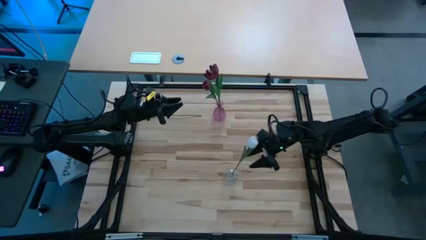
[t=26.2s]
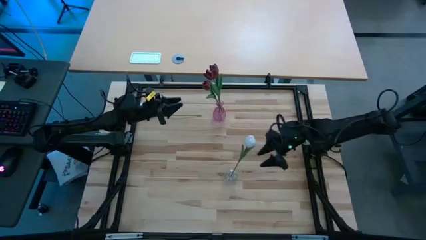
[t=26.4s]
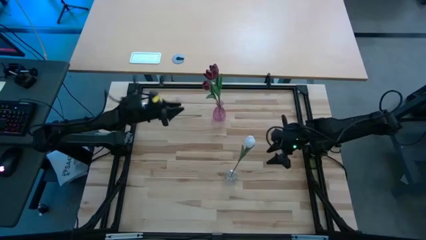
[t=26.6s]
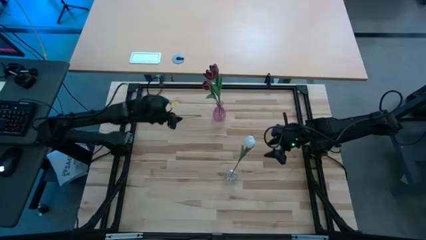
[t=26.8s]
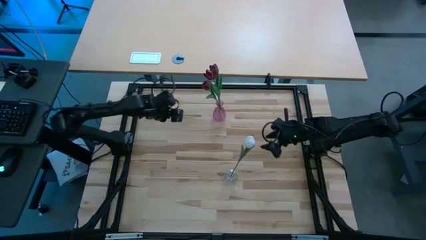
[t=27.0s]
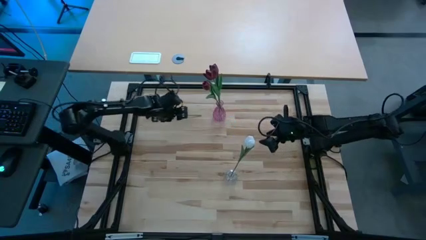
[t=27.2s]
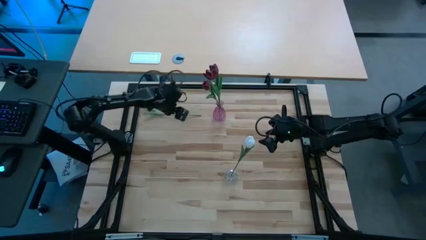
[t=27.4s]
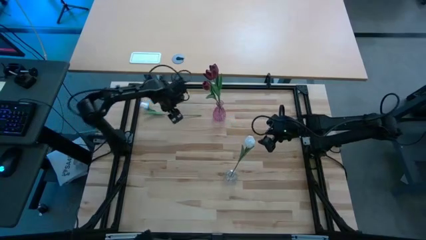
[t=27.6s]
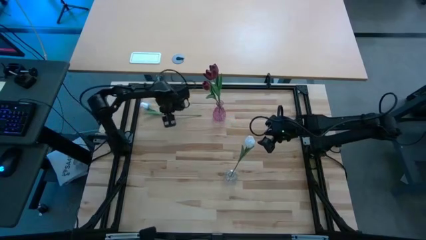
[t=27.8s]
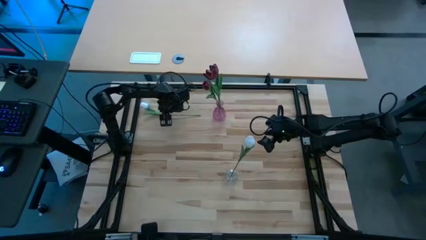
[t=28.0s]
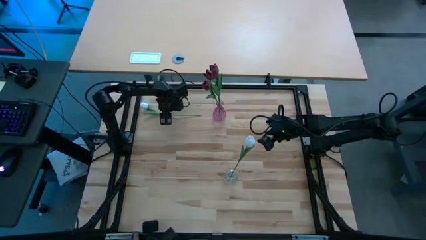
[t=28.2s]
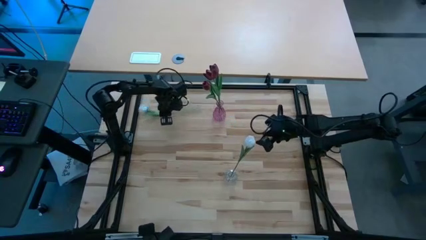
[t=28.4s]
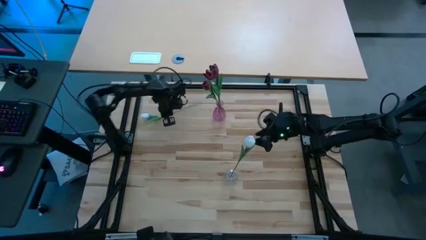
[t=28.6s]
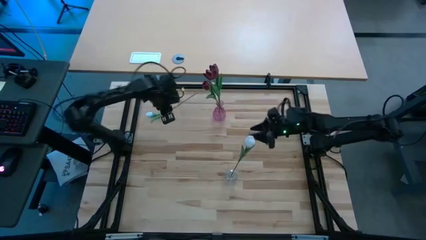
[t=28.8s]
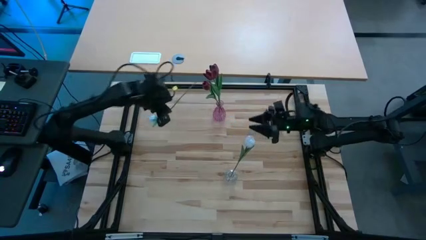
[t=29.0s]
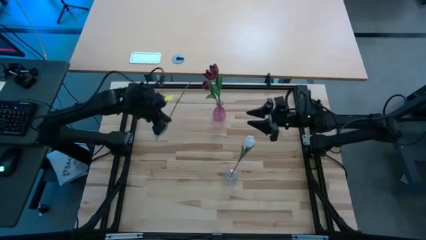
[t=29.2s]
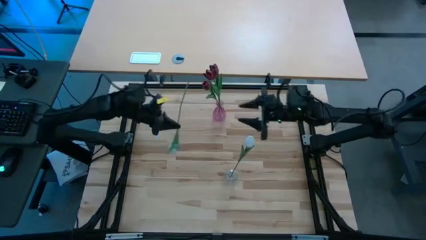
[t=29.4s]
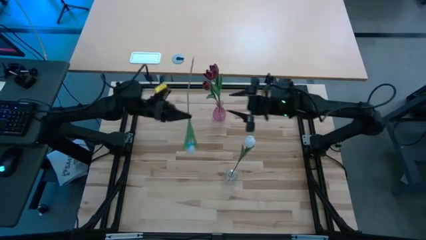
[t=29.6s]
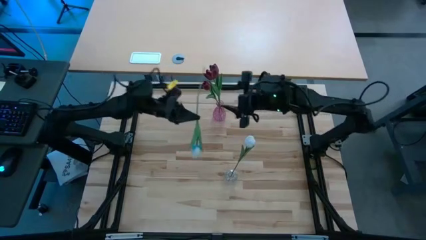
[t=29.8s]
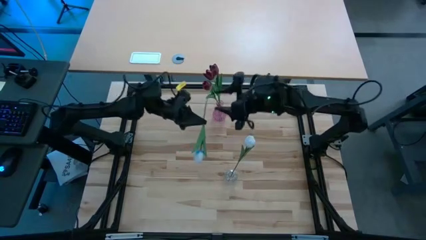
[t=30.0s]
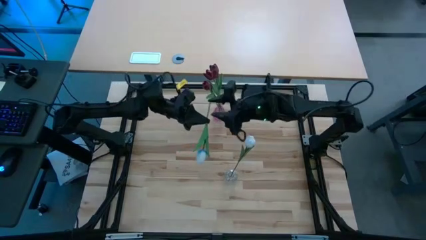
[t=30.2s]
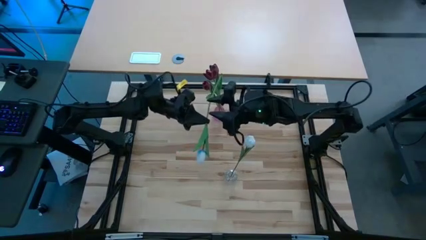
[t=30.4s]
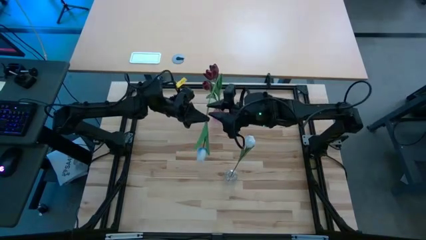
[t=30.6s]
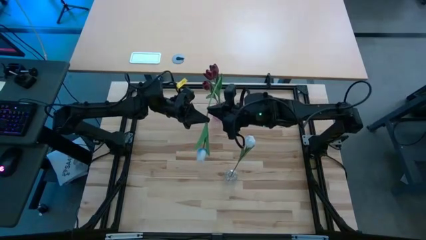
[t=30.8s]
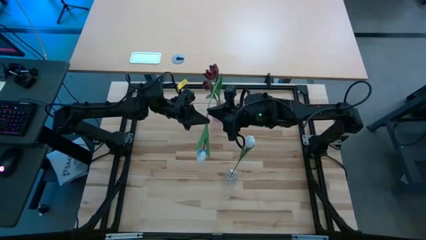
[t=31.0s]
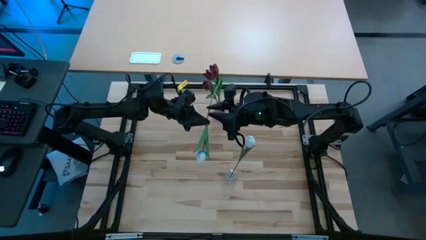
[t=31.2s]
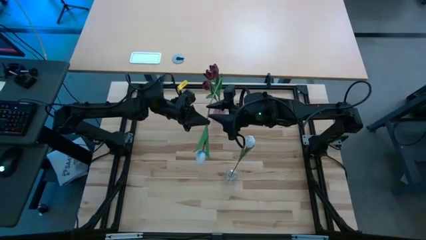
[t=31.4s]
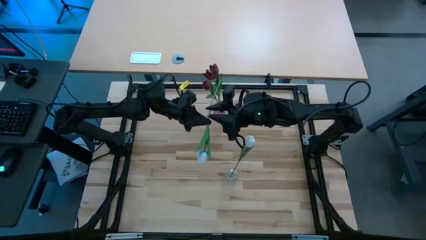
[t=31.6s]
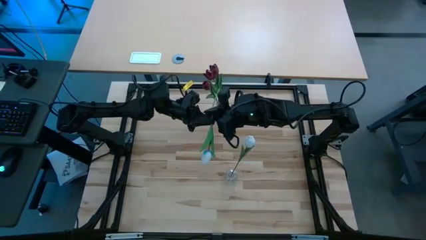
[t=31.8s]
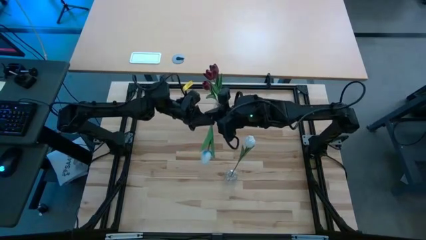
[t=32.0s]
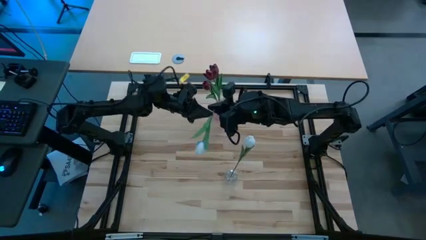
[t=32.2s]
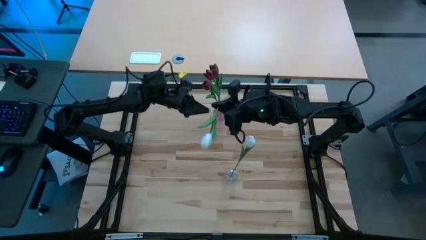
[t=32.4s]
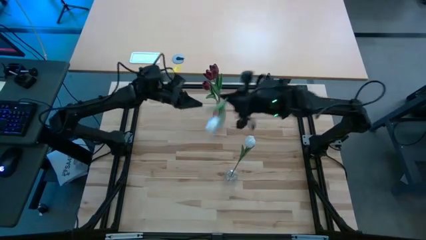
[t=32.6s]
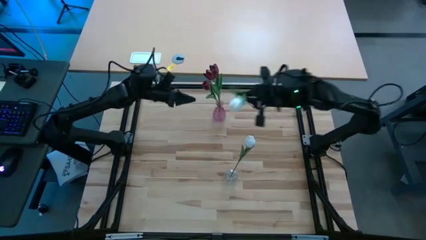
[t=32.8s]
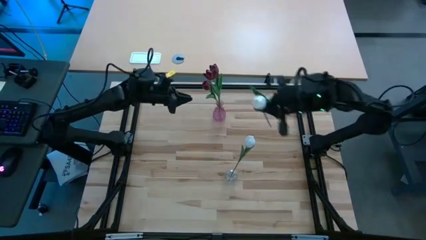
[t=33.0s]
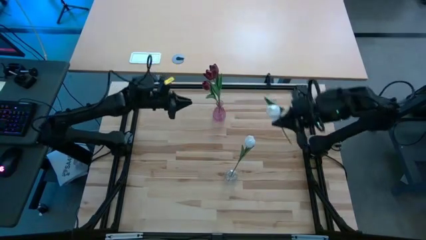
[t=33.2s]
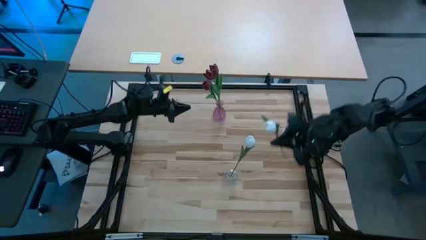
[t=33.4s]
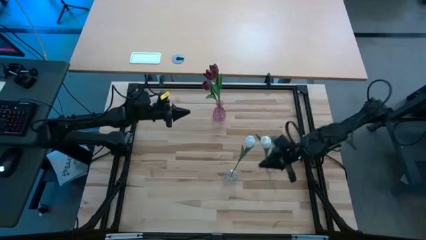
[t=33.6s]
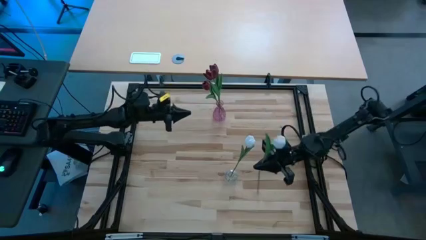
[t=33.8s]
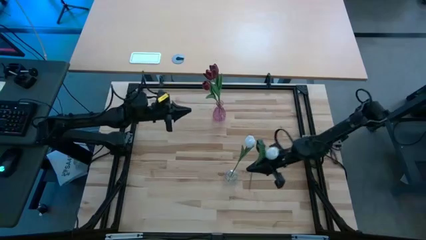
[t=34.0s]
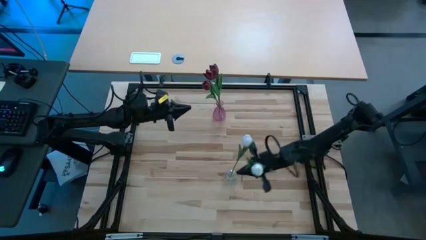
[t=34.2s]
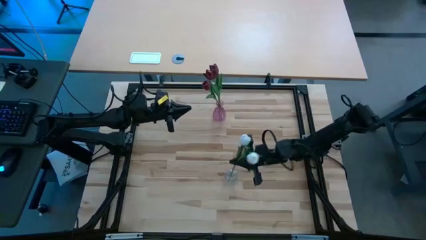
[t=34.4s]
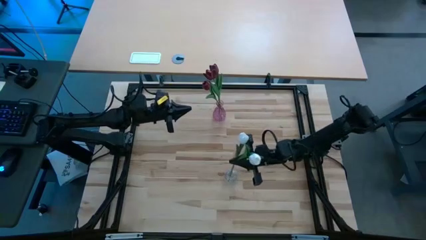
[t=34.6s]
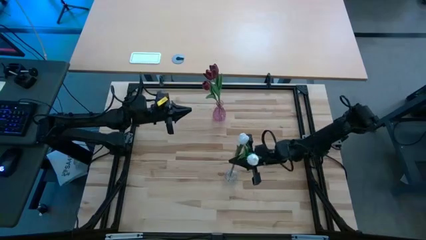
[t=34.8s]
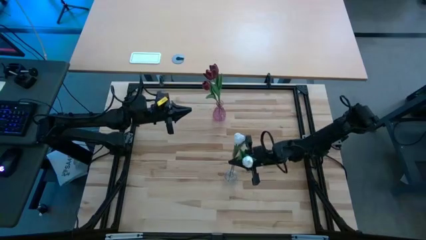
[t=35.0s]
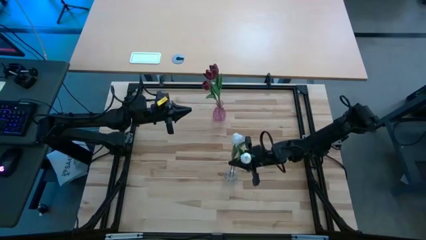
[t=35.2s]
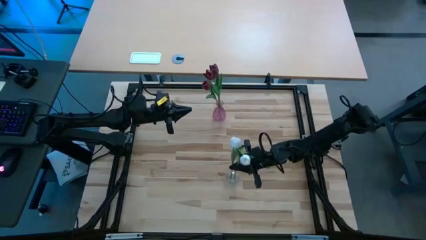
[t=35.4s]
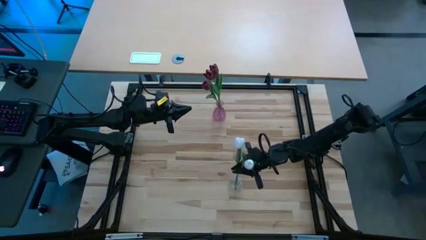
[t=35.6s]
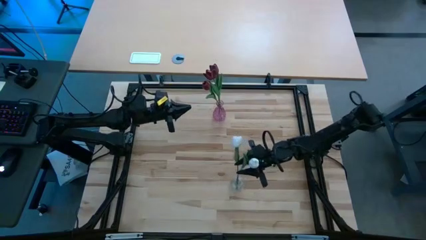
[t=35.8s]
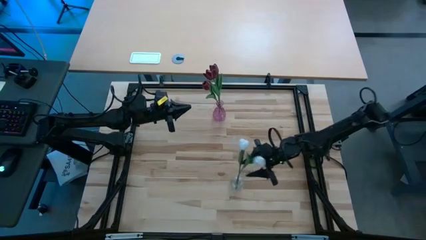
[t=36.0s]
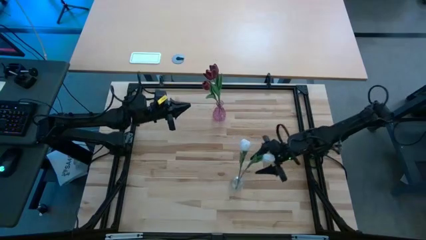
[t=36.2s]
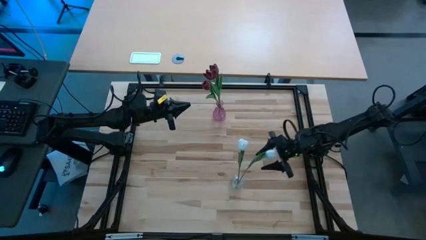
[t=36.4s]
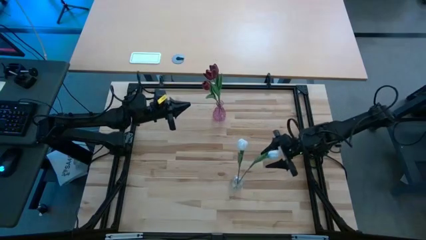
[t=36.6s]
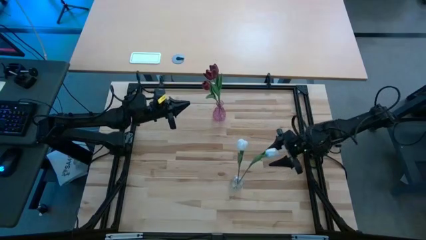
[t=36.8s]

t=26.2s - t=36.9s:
Task: Sort flowers into vase by color
Put the white flower into the transparent vase

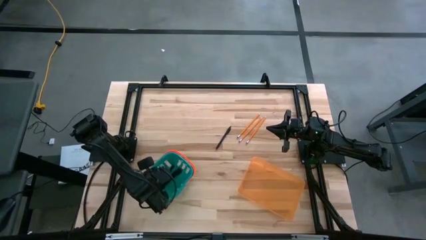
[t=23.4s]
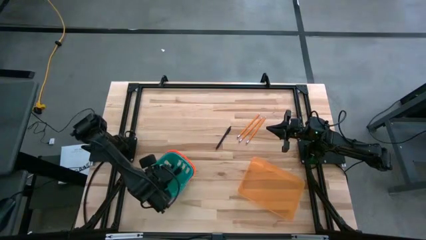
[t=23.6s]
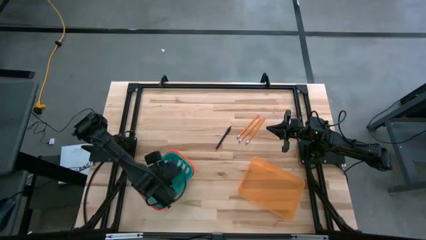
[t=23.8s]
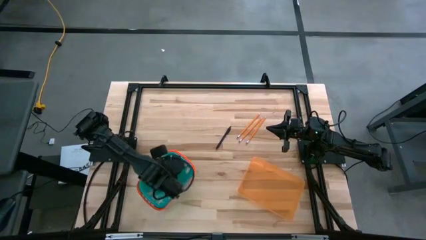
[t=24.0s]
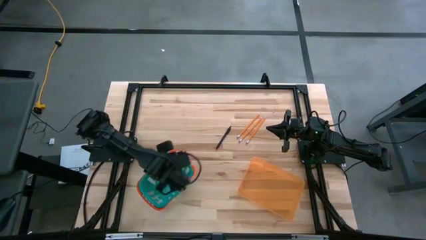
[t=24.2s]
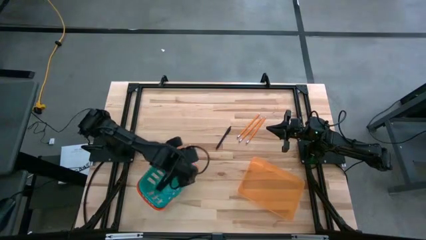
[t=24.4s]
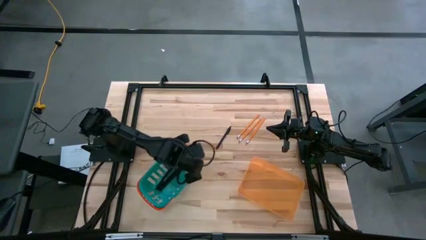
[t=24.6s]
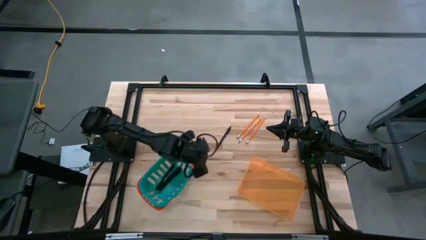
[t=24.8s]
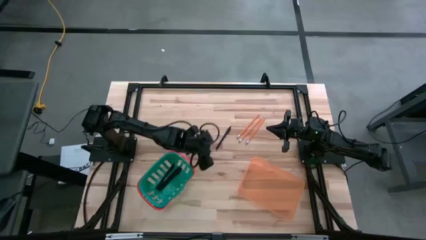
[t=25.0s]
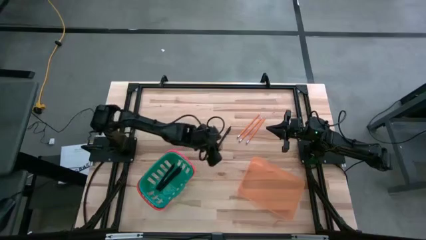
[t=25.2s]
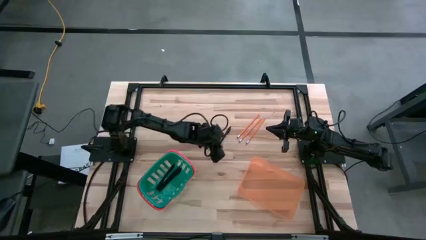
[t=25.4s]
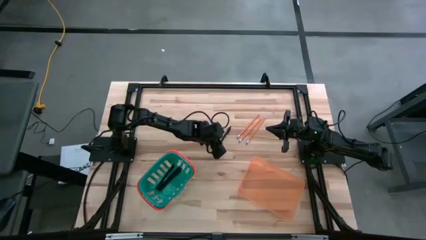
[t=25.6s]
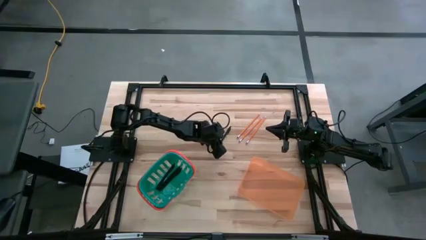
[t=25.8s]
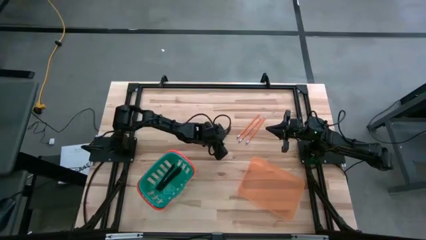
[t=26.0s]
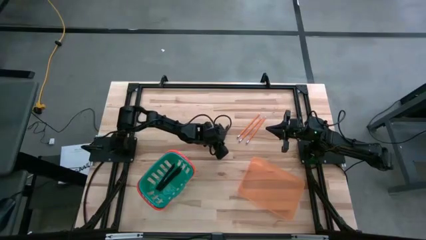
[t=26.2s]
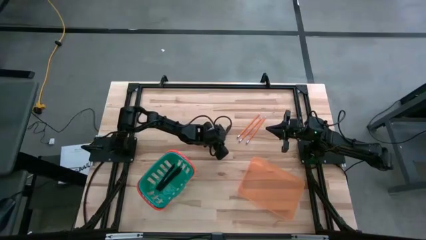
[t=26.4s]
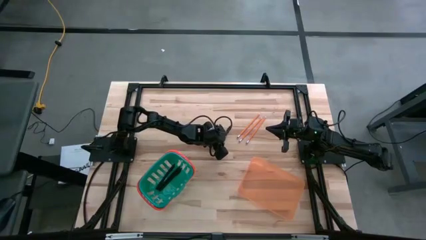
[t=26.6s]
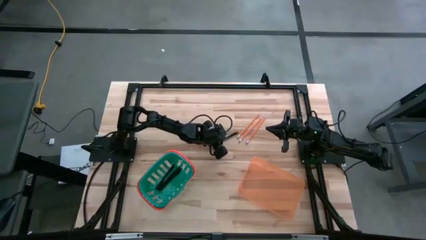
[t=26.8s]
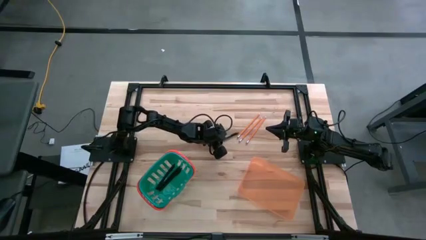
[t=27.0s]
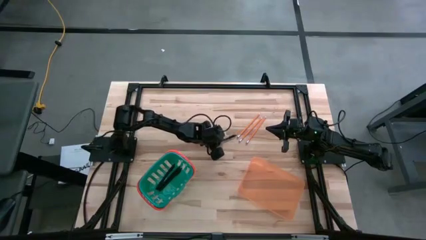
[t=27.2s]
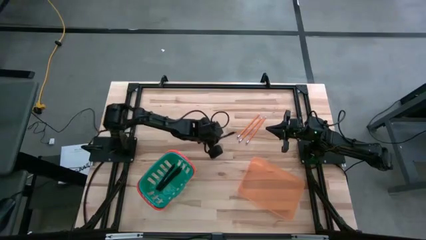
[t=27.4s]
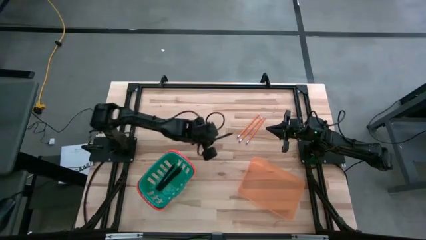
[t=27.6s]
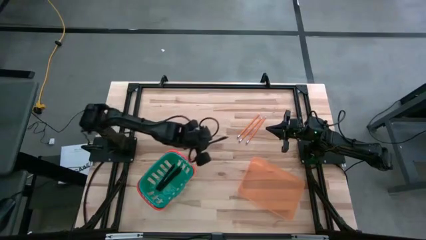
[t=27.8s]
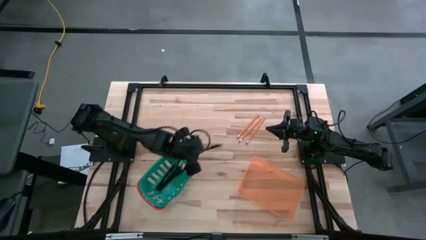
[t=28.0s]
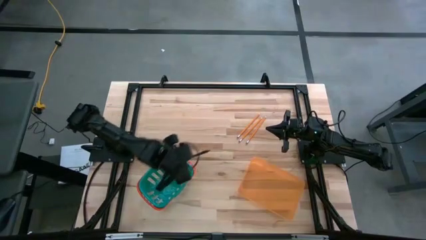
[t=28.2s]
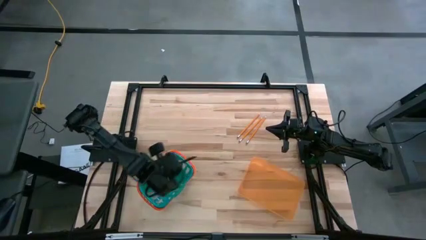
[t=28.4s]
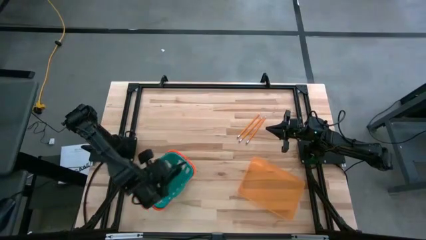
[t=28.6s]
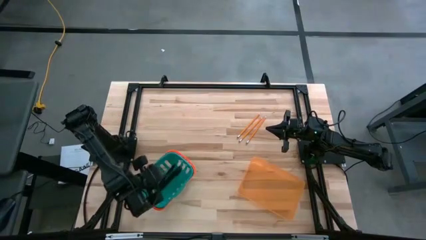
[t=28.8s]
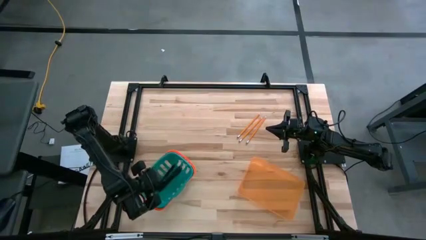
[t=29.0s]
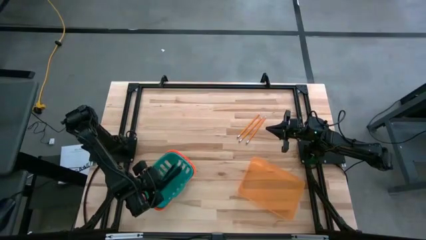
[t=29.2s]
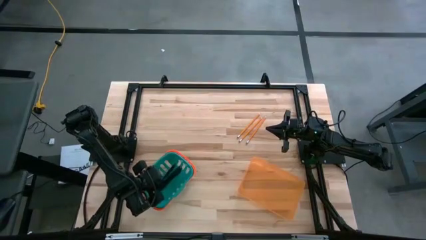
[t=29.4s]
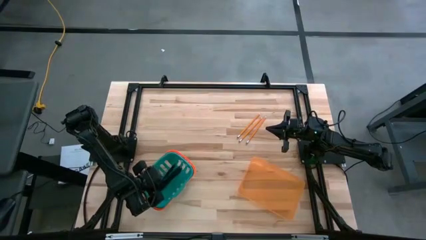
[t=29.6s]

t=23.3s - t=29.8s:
Task: Sort pens & pencils
Put the black ballpen into the blue bin
